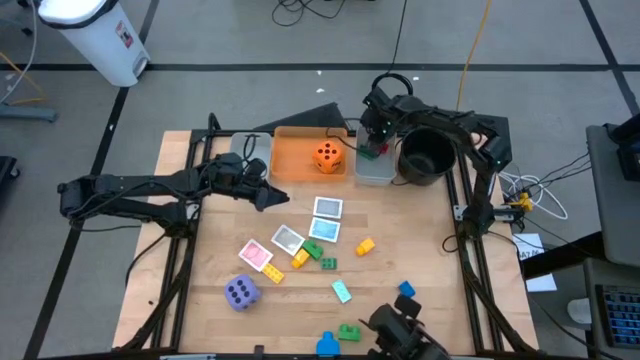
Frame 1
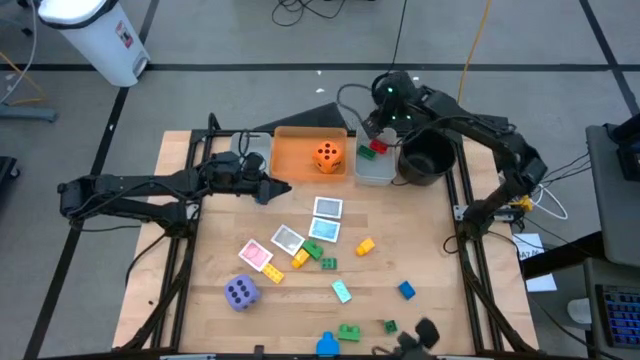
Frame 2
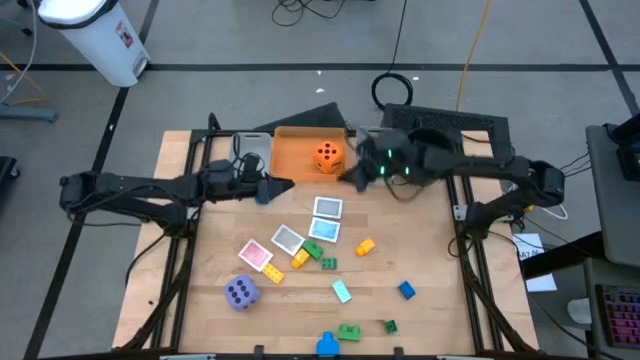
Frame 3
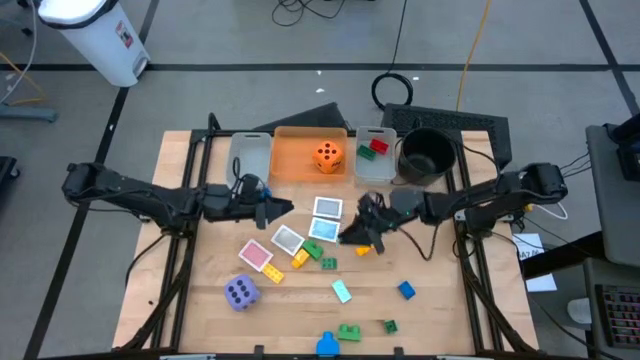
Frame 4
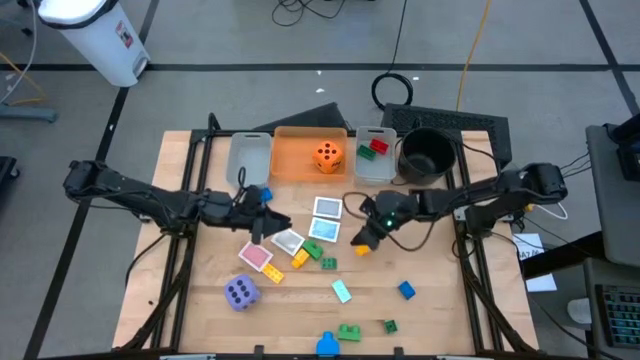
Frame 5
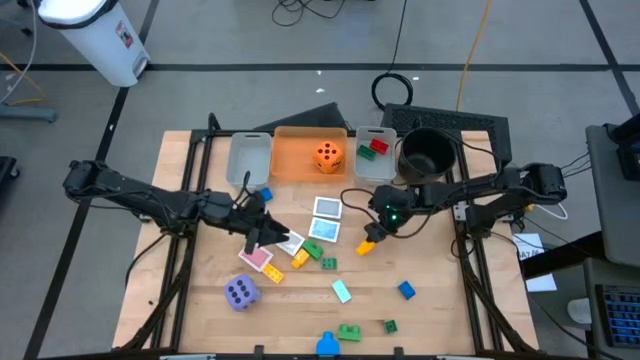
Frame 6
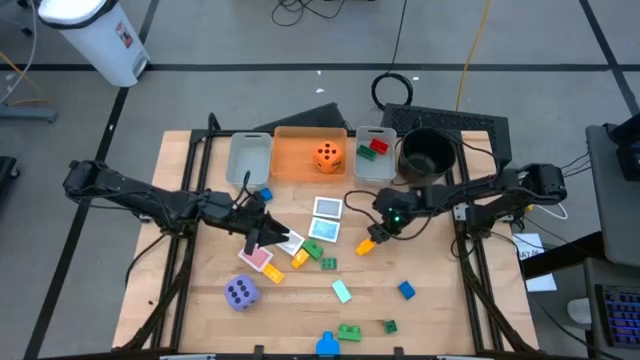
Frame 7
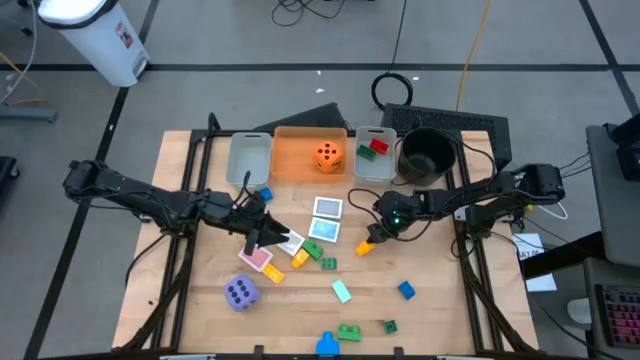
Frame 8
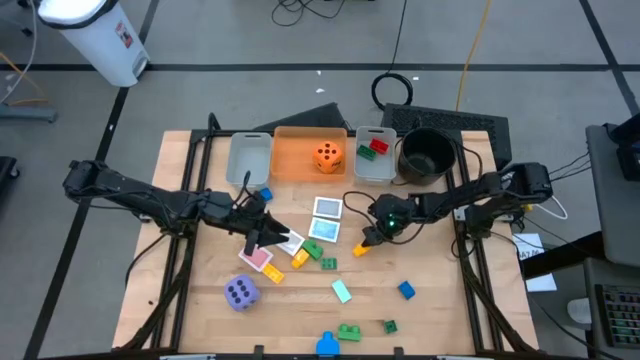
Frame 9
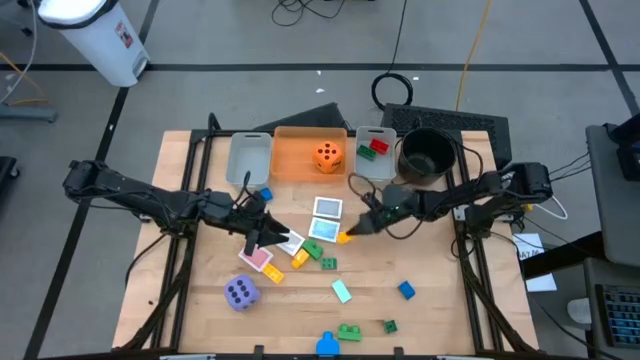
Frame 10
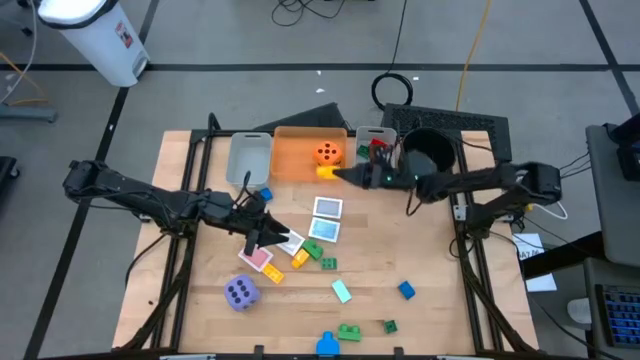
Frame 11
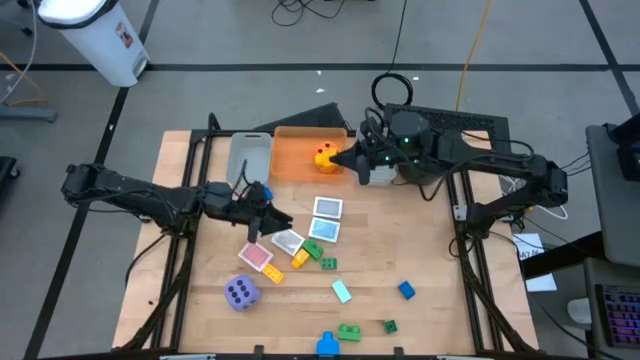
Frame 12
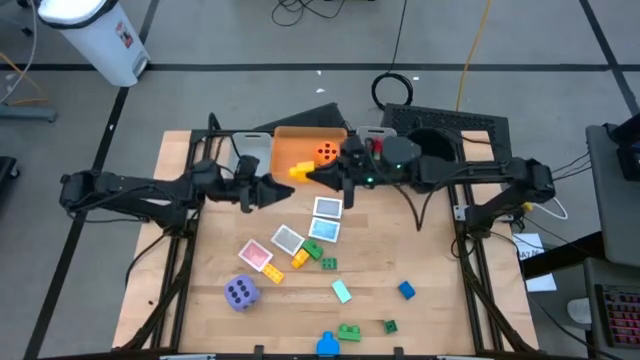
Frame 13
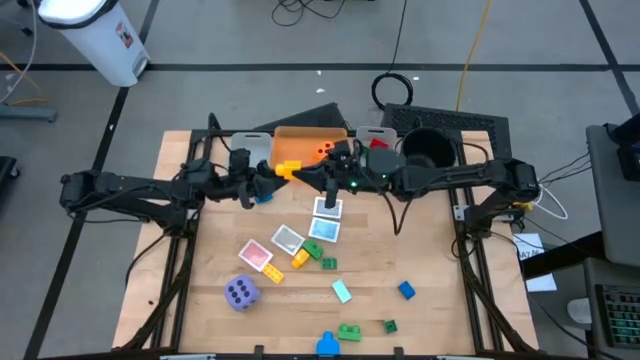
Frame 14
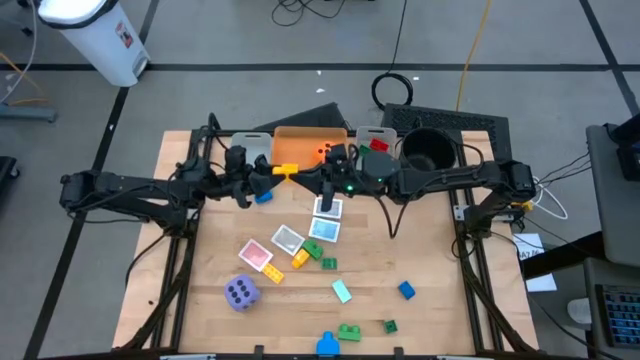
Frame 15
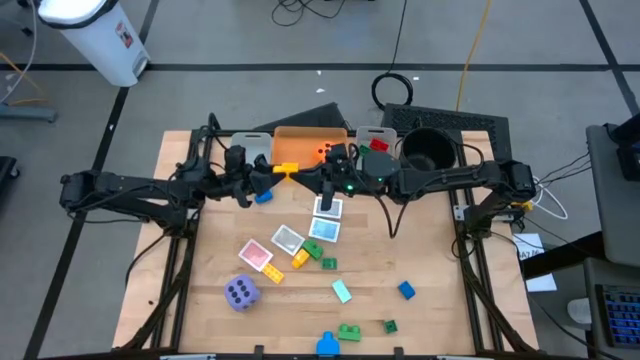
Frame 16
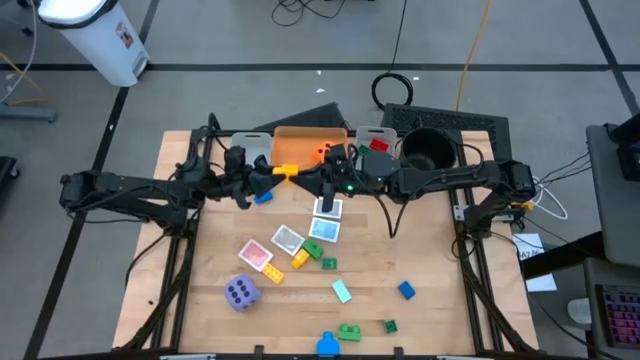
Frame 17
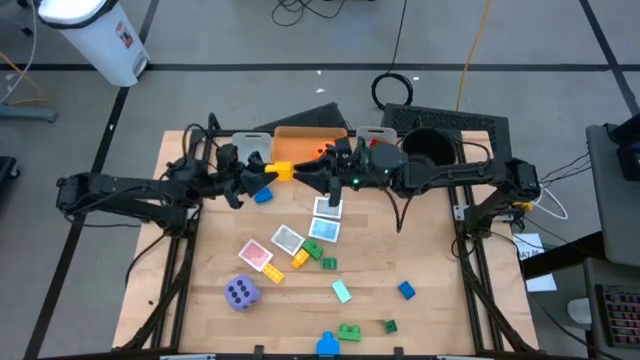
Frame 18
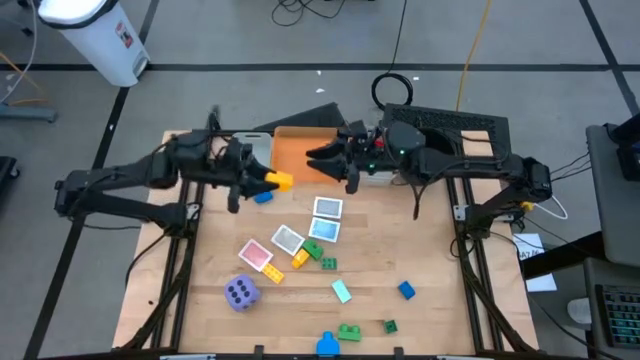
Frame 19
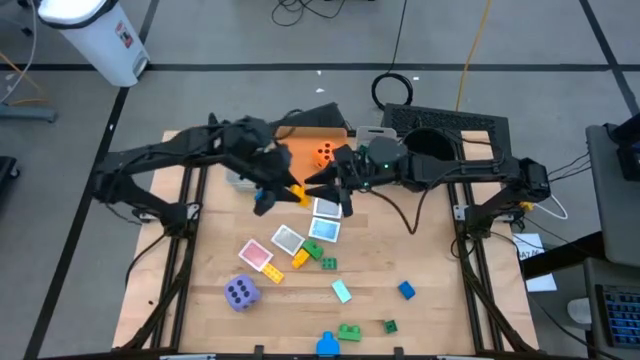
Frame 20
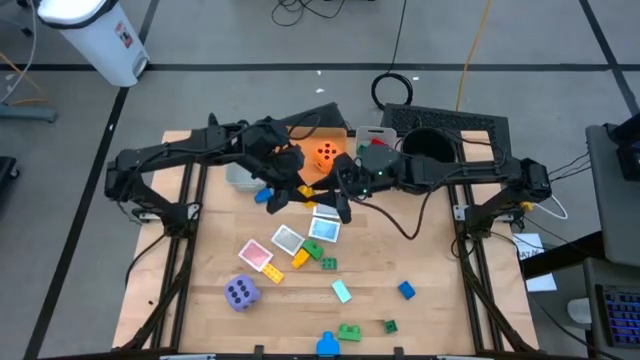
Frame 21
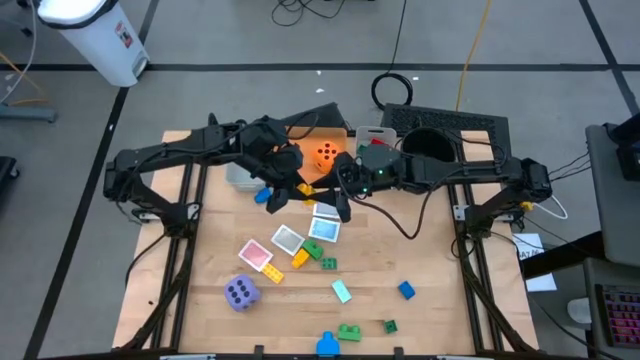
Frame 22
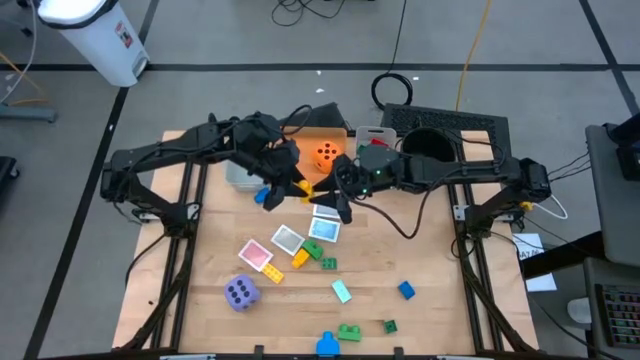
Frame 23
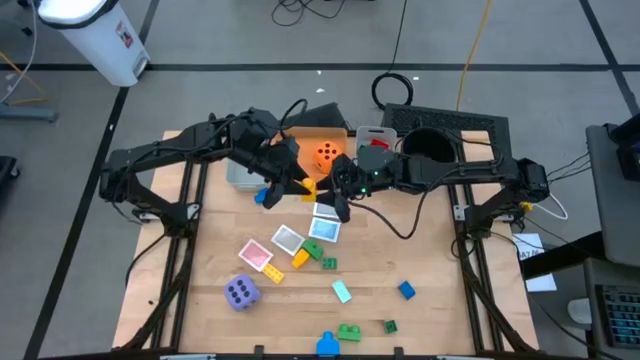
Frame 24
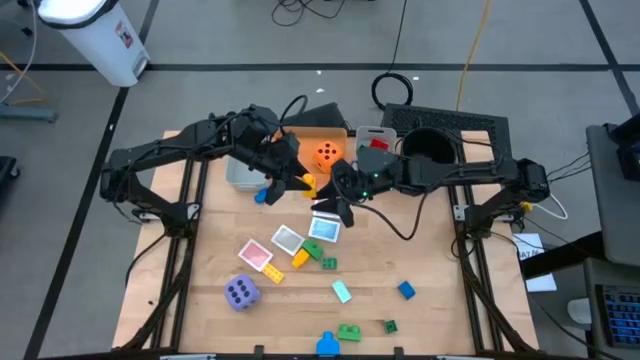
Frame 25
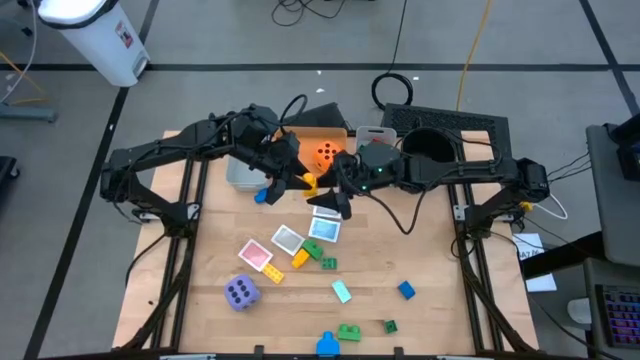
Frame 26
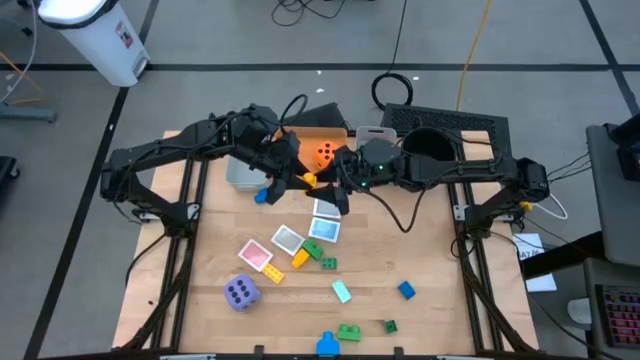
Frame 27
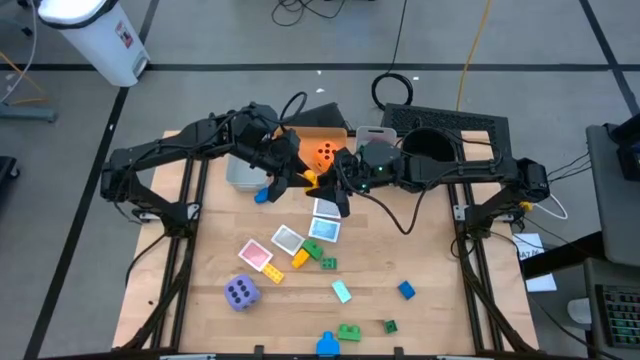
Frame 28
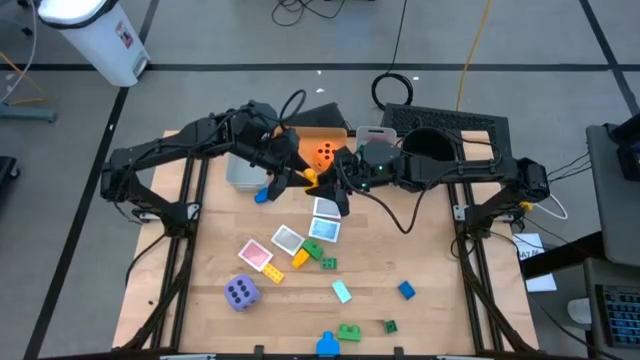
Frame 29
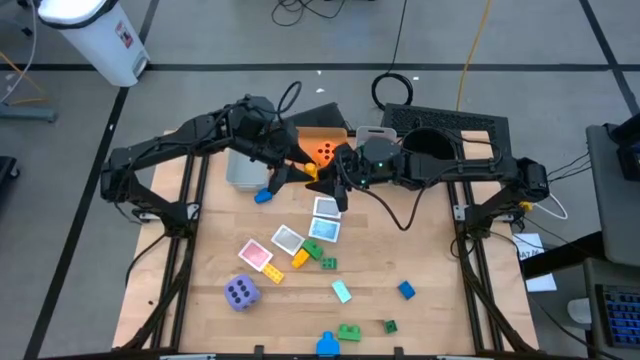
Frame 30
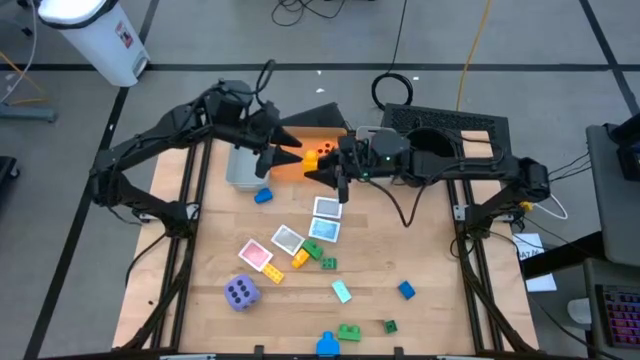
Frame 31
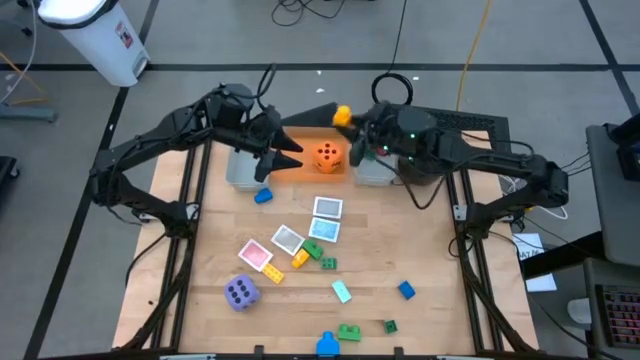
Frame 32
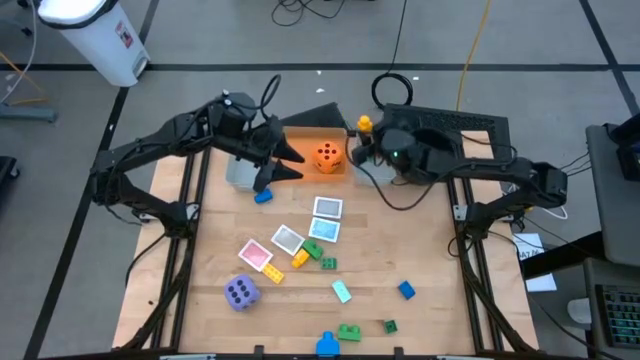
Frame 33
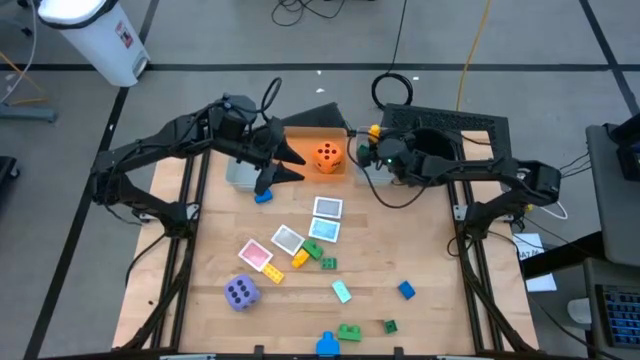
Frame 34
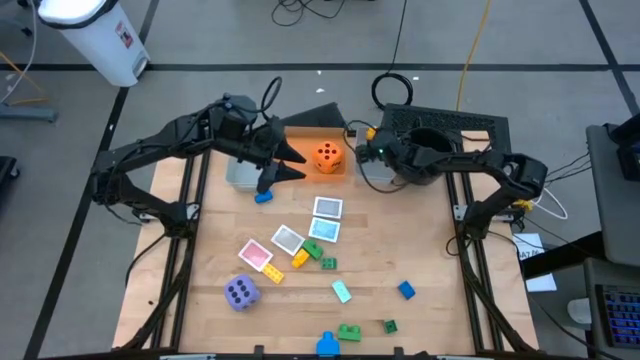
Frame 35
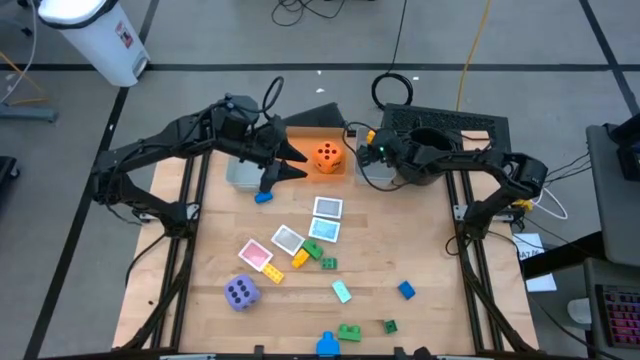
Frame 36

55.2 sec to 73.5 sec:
Task: Pick & Place Toys
Put the yellow game piece into the right gray bin

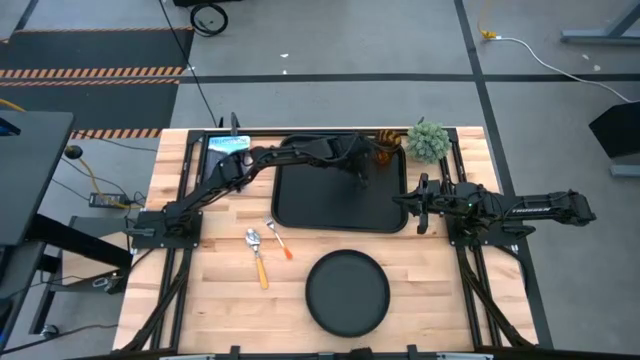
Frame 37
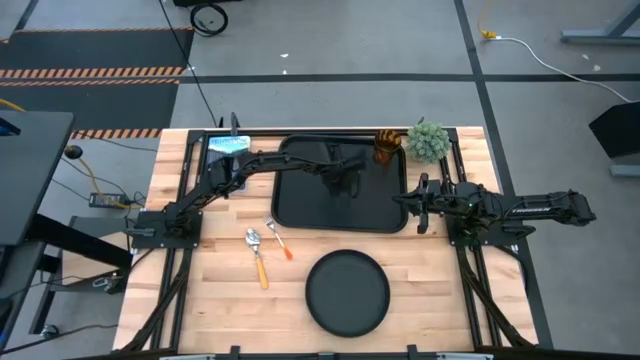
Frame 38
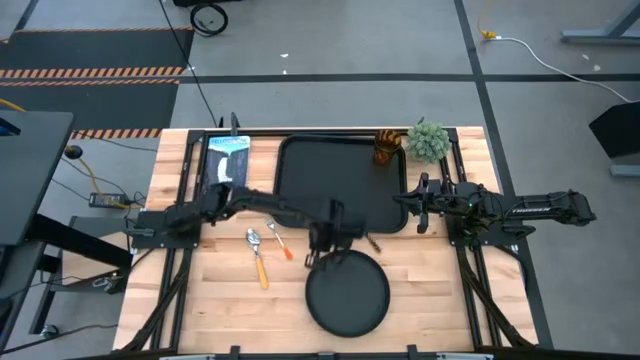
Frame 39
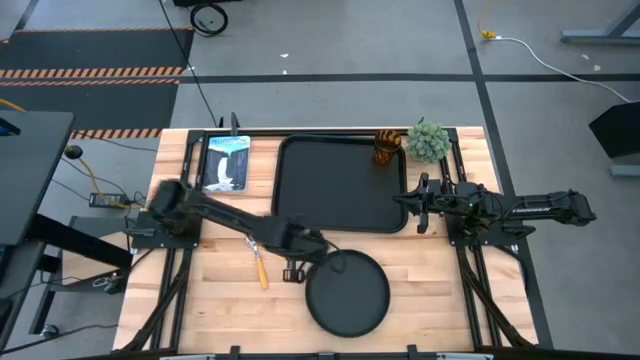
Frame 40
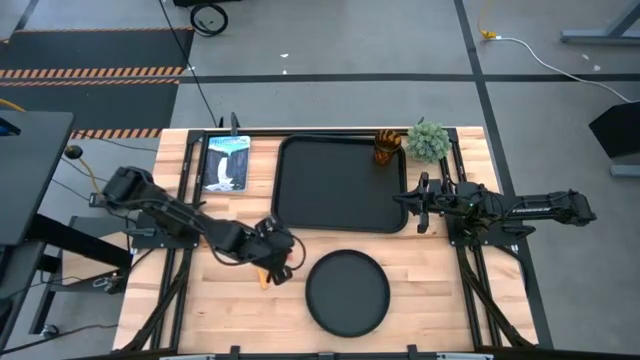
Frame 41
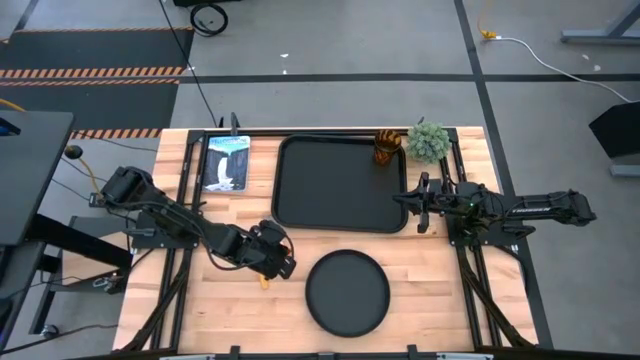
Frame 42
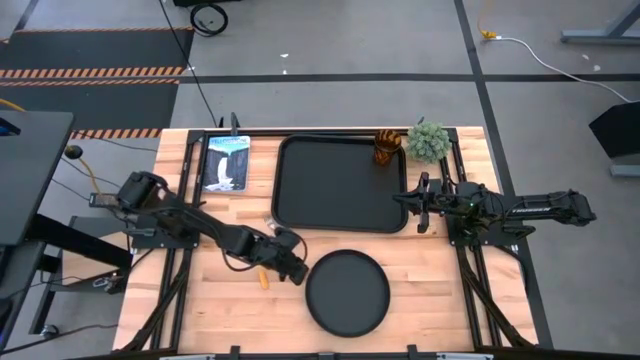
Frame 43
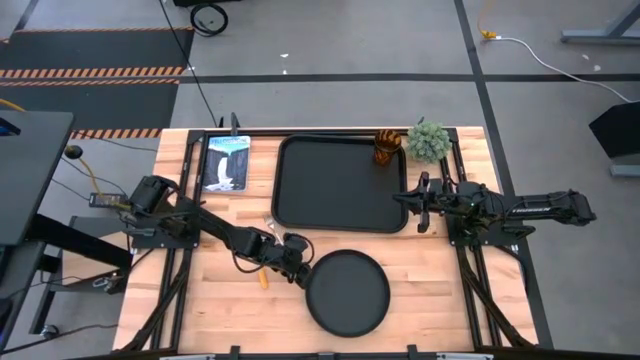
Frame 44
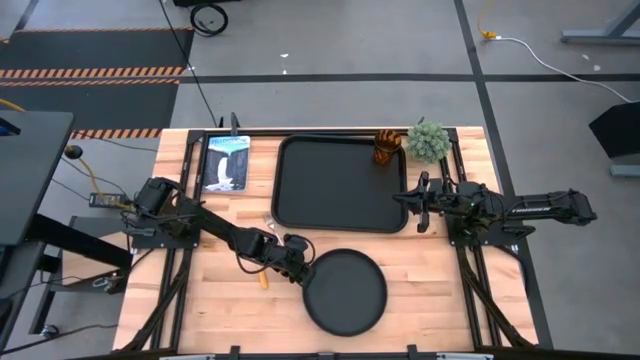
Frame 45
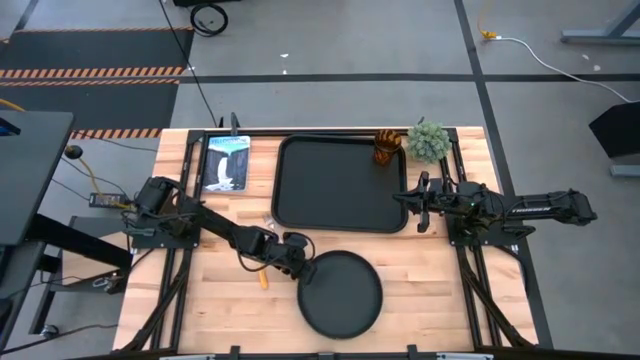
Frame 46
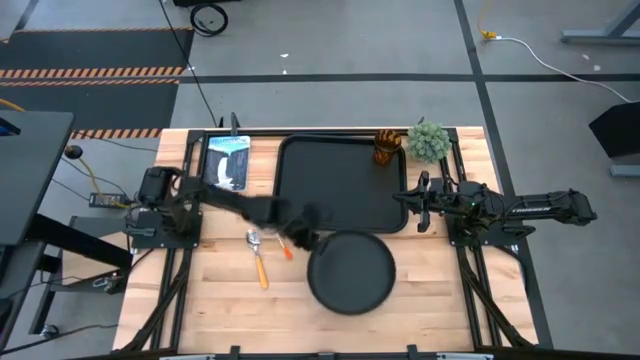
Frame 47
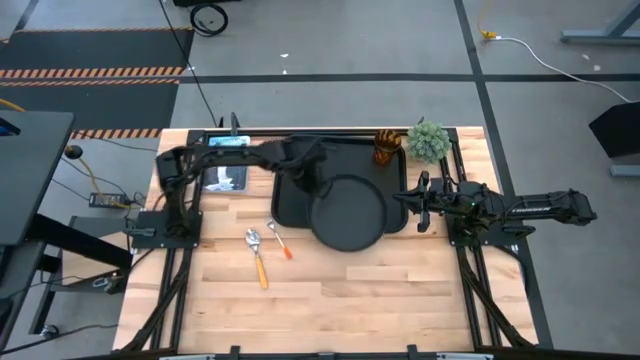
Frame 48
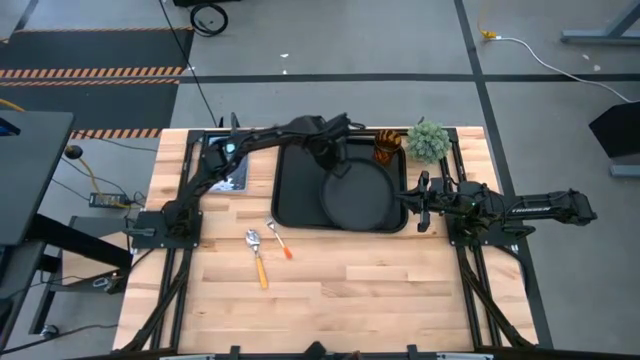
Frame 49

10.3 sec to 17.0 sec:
Task: Pick and place plate/cup/fork/spoon on tray
Put the black plate on the black serving tray at the bottom of the brown glass
